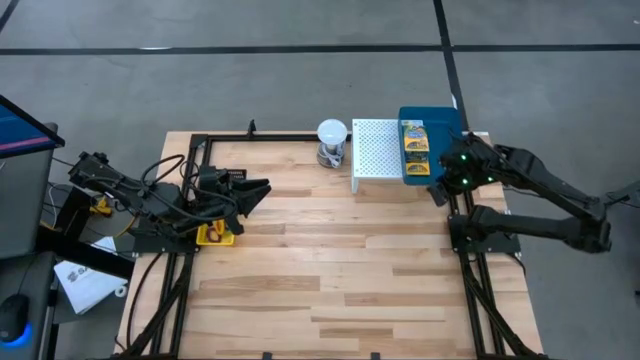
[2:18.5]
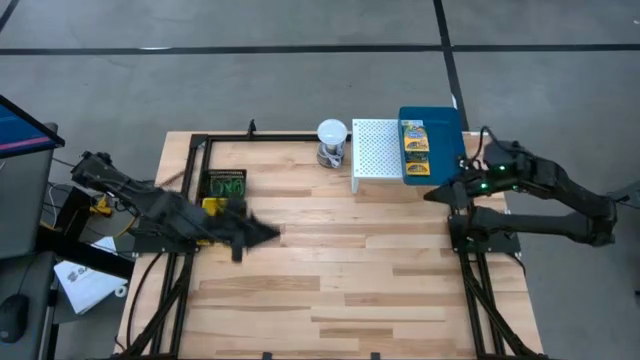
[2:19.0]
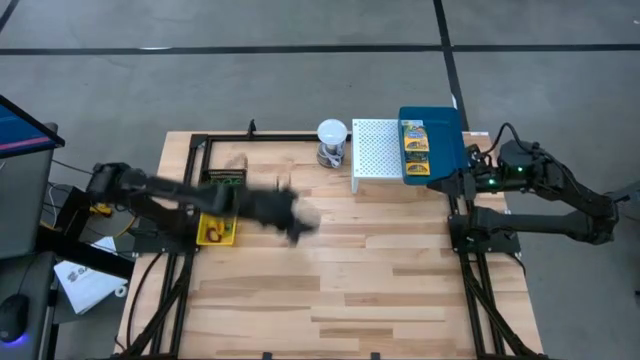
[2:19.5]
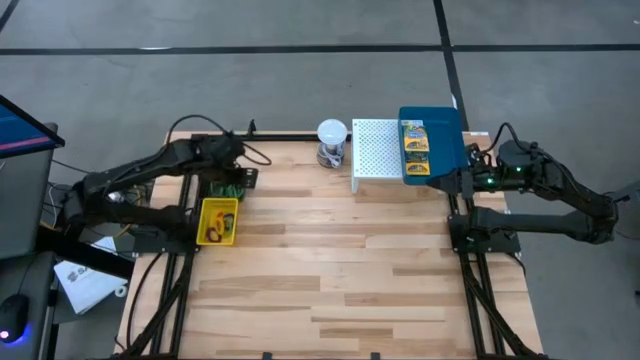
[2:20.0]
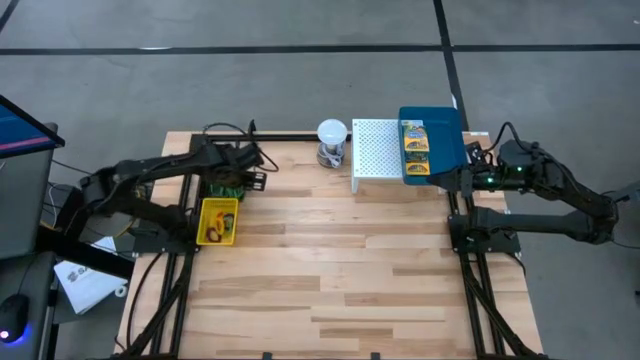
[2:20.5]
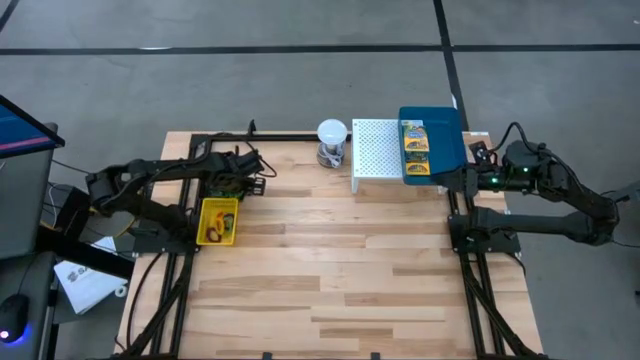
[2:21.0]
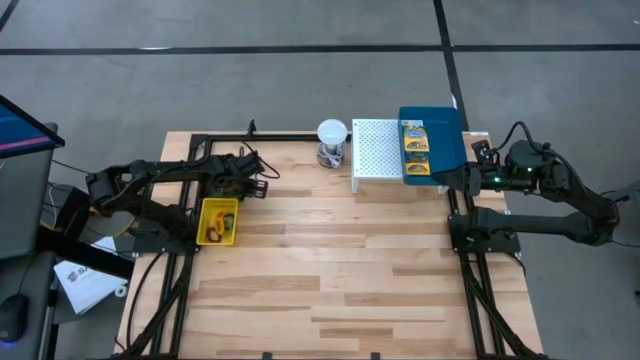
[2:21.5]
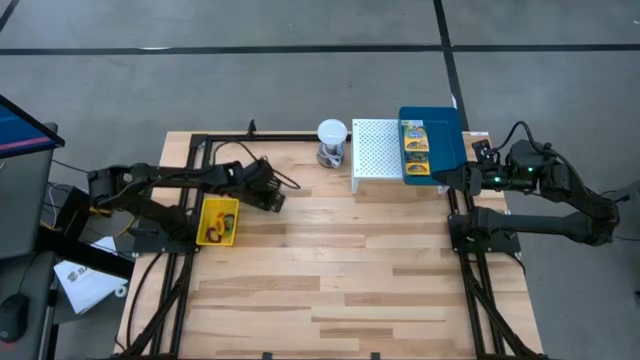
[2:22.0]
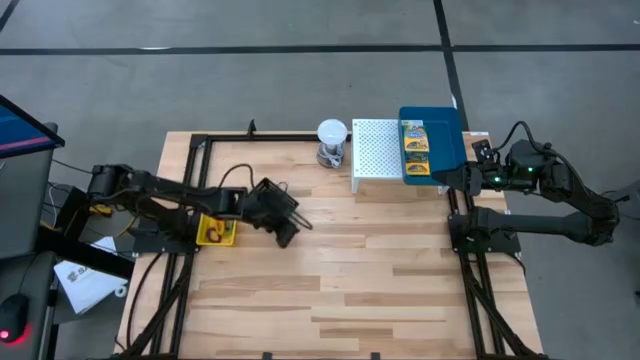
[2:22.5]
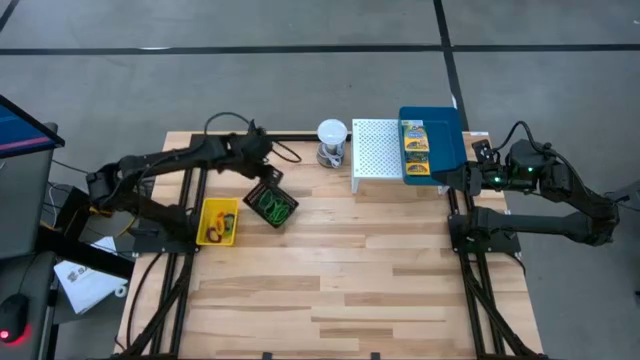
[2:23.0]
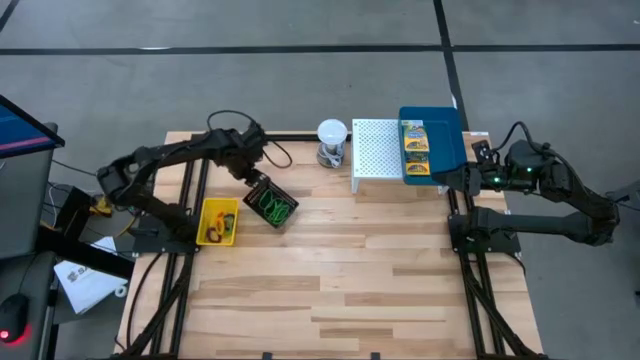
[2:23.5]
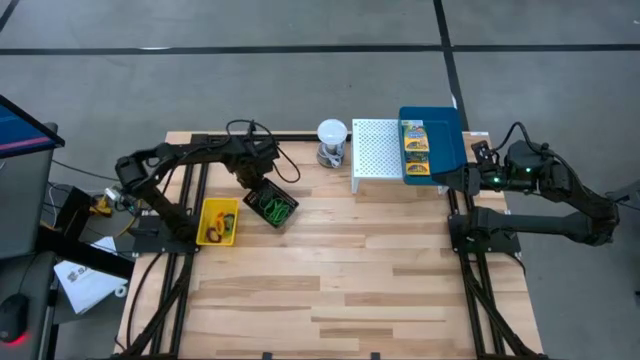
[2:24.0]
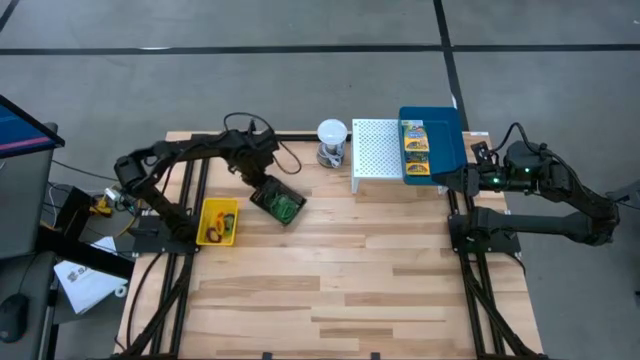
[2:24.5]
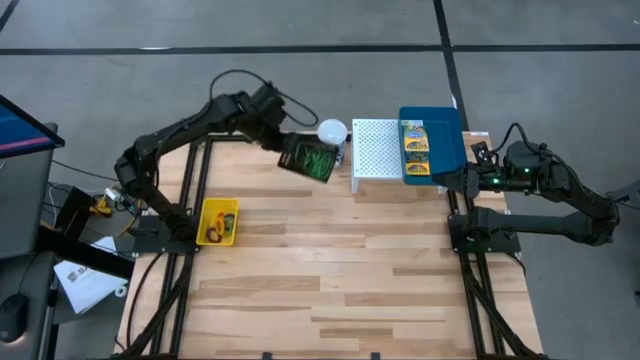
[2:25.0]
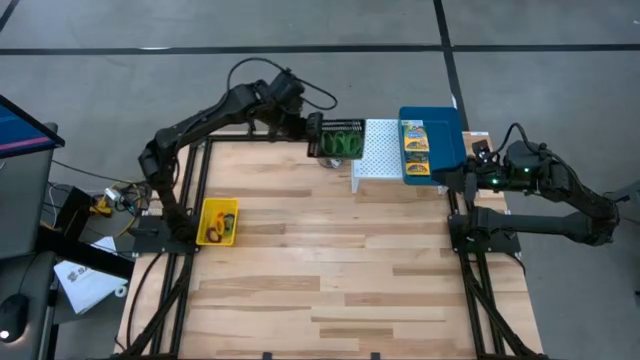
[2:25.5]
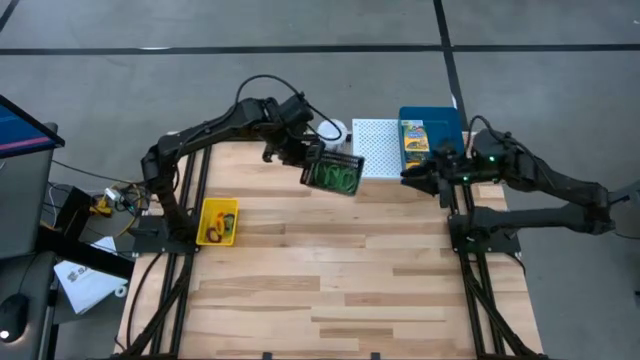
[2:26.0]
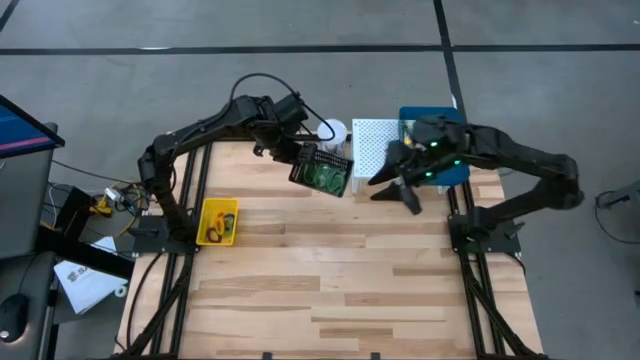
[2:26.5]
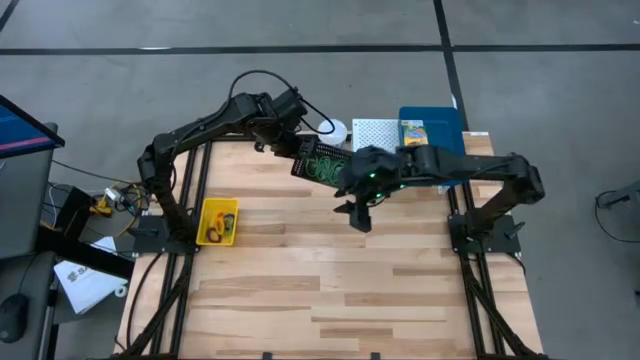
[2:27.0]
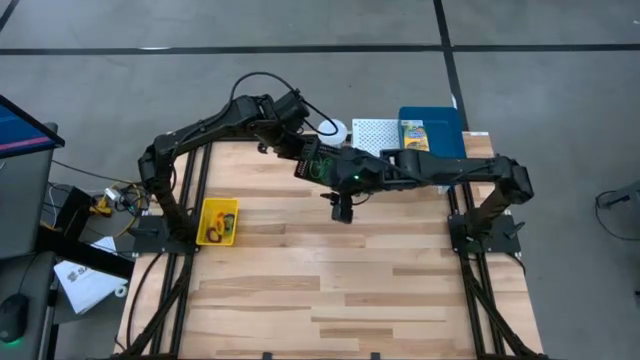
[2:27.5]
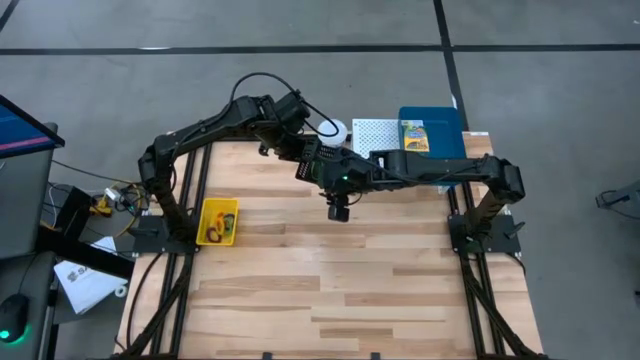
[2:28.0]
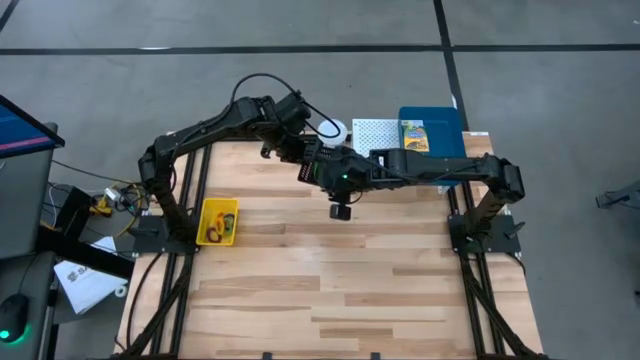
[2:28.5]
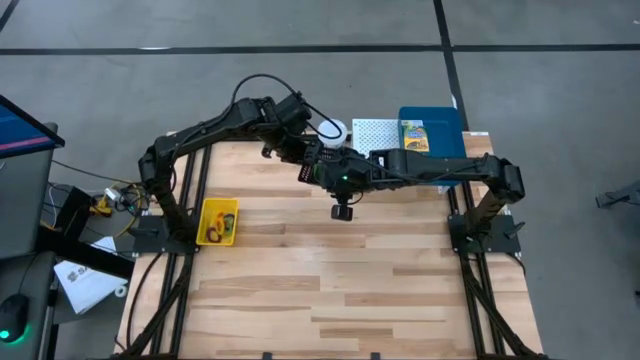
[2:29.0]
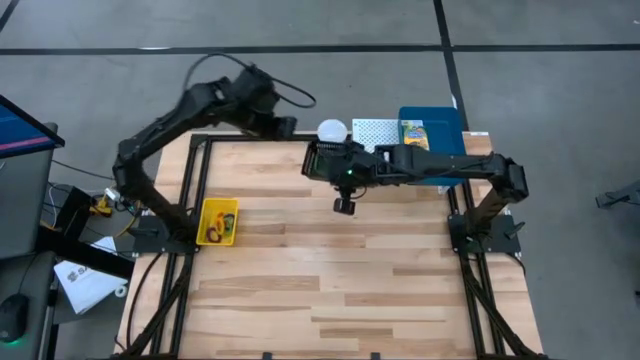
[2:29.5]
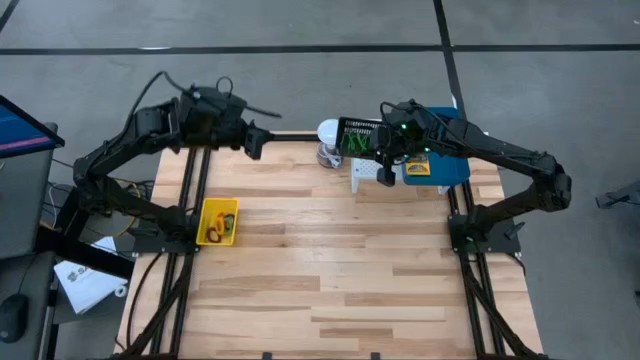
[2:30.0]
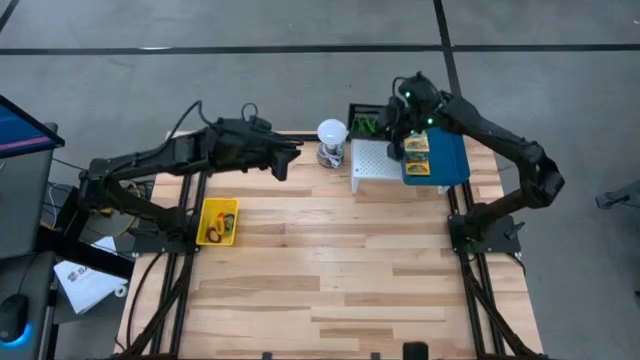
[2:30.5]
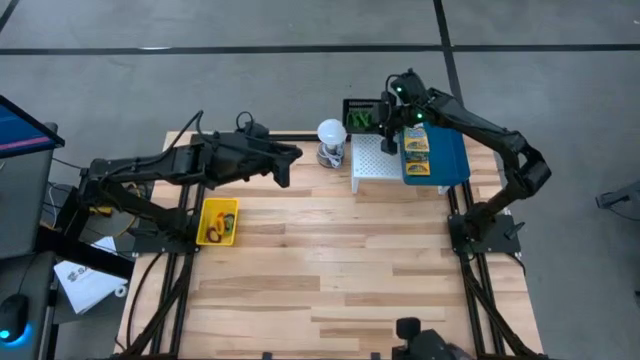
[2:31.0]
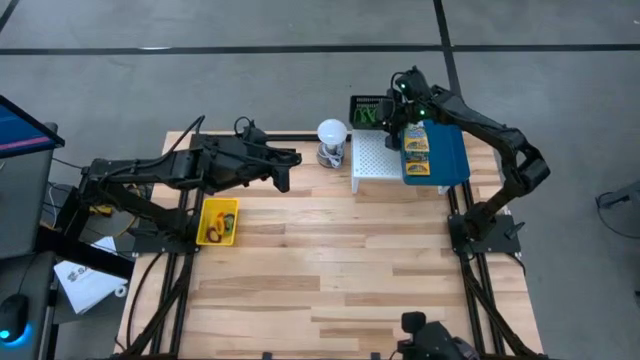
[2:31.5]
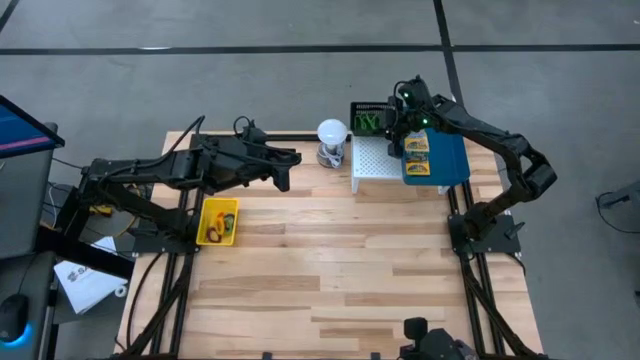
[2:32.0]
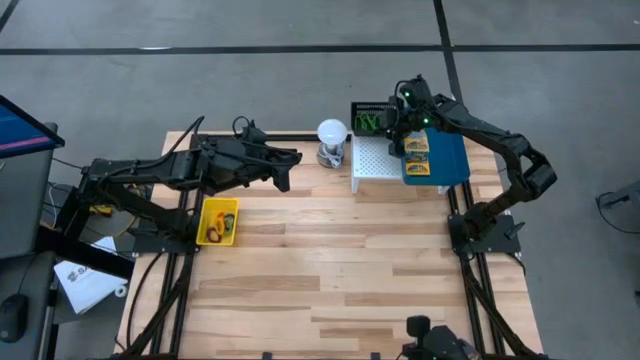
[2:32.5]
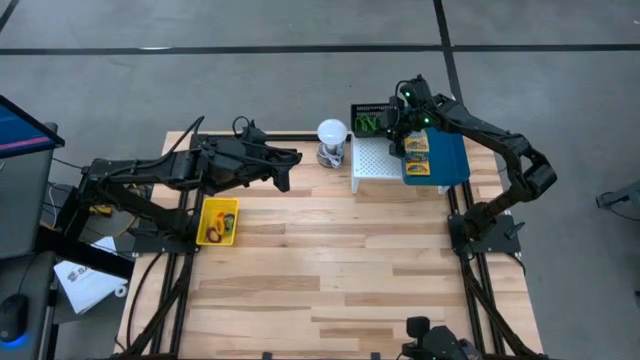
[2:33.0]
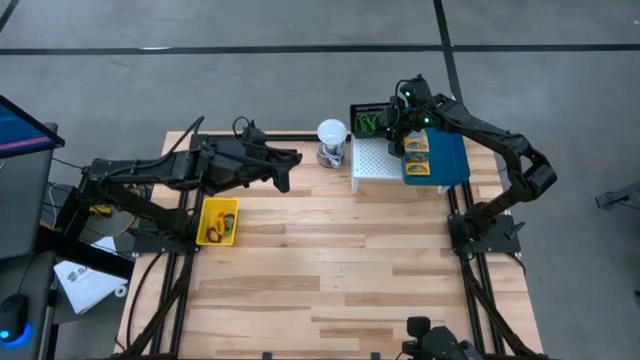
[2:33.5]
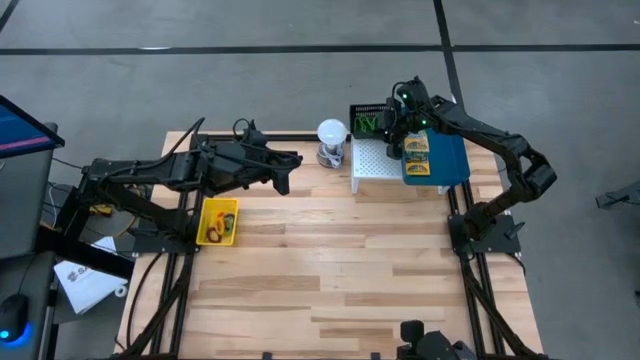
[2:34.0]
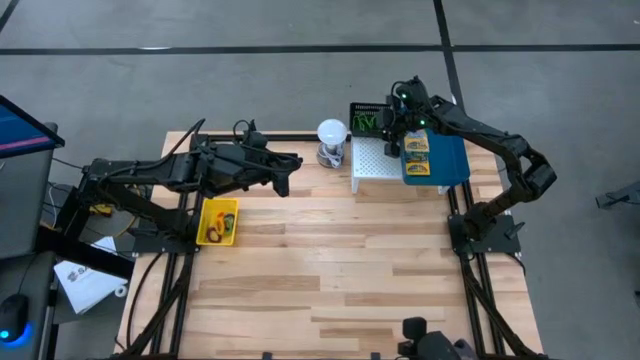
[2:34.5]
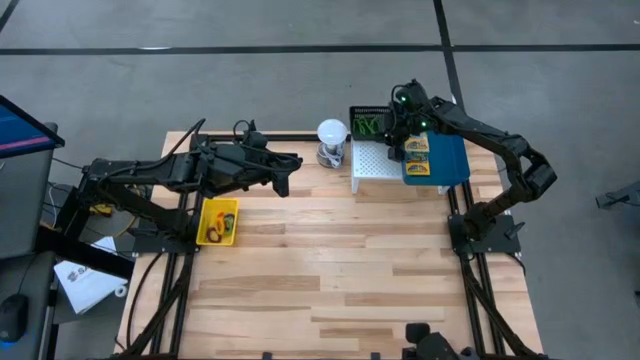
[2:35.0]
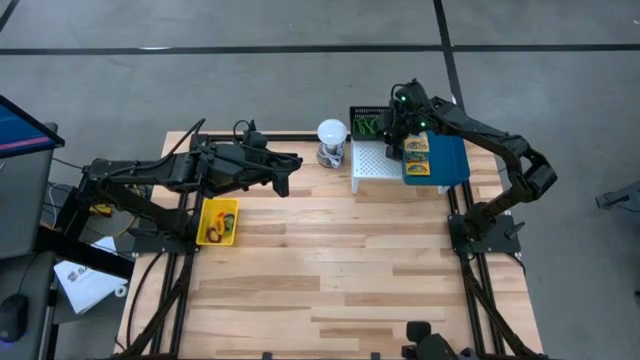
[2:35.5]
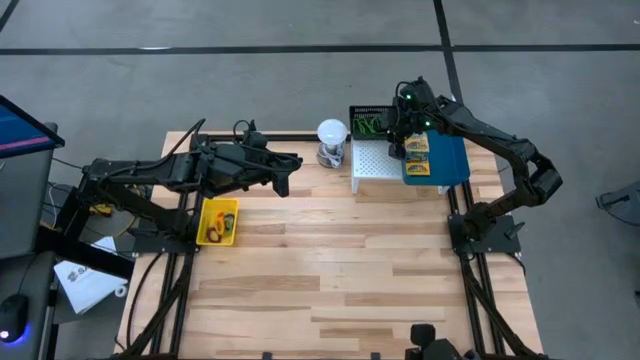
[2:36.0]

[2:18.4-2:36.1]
Task: Pick & Place Office Desk Supplies
Put the black bin on the shelf

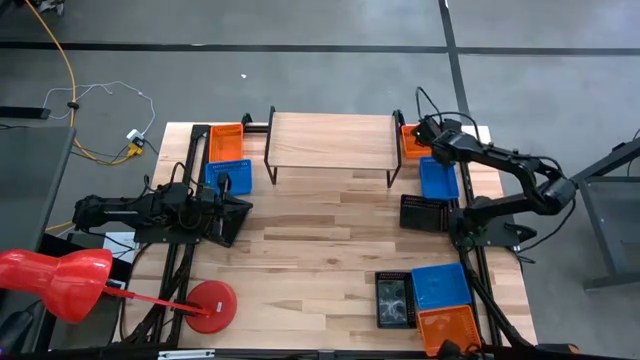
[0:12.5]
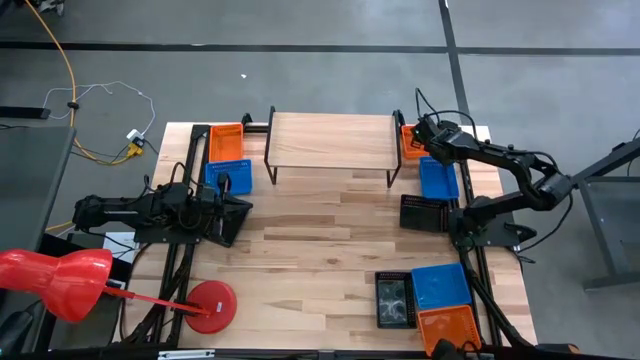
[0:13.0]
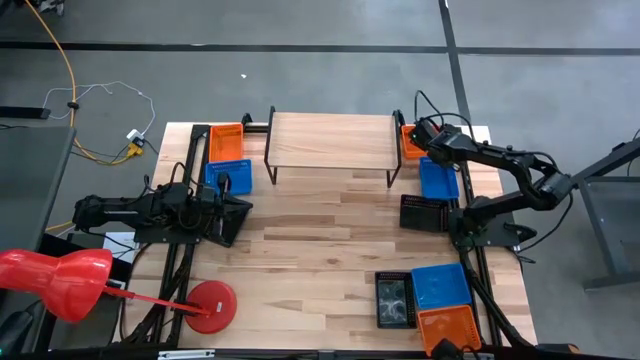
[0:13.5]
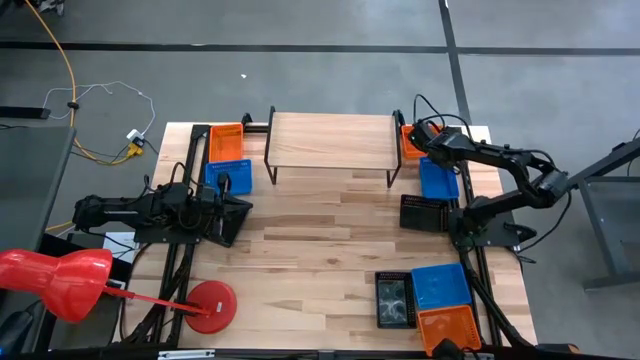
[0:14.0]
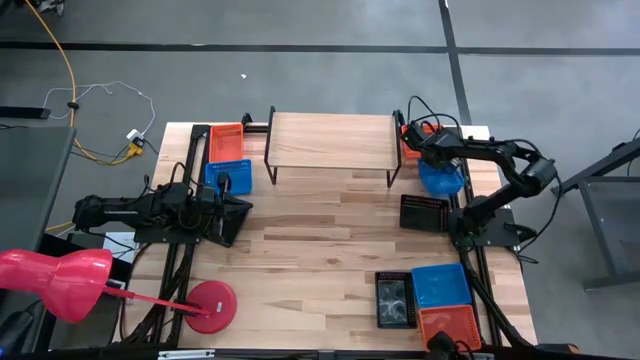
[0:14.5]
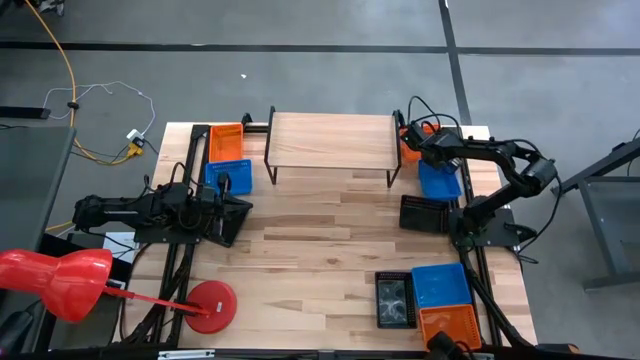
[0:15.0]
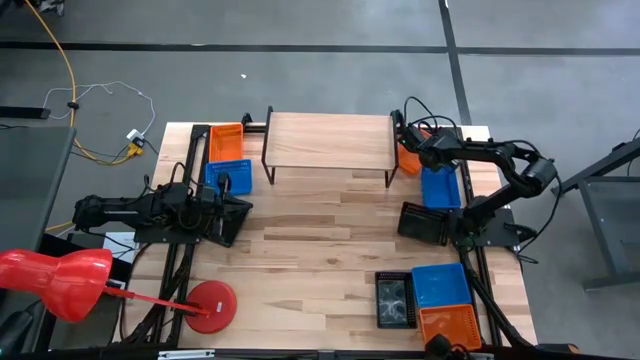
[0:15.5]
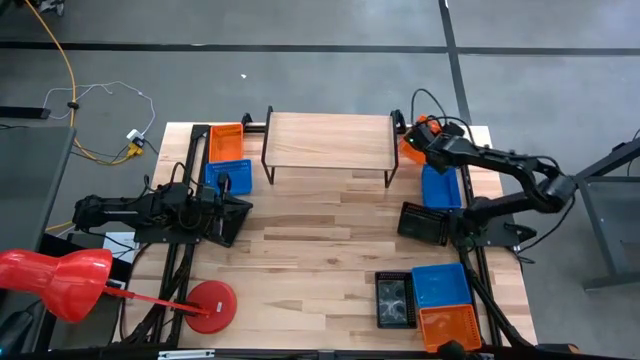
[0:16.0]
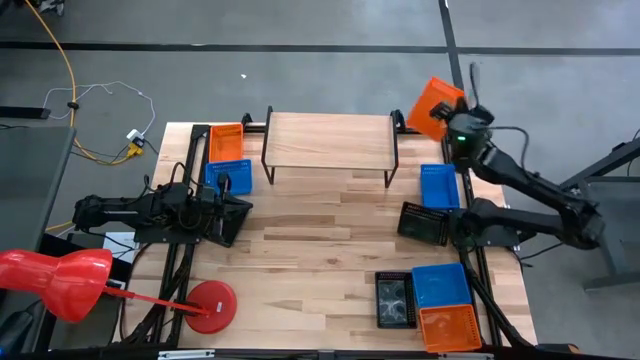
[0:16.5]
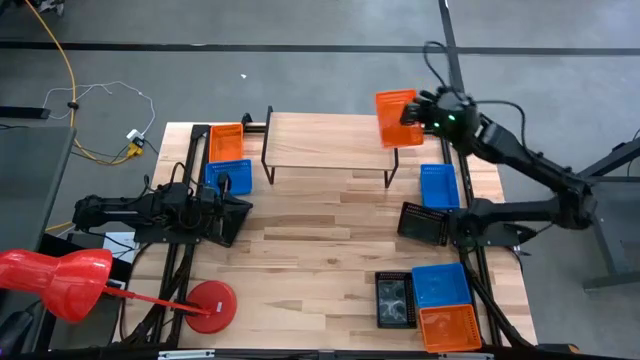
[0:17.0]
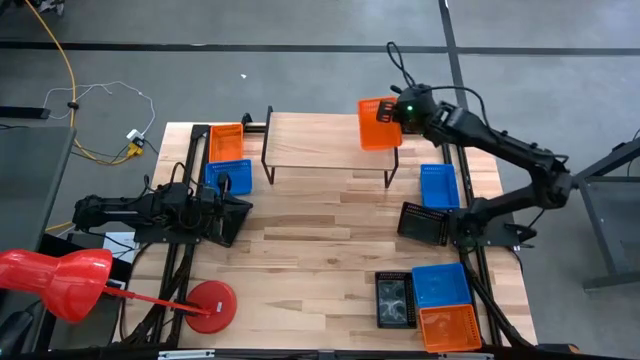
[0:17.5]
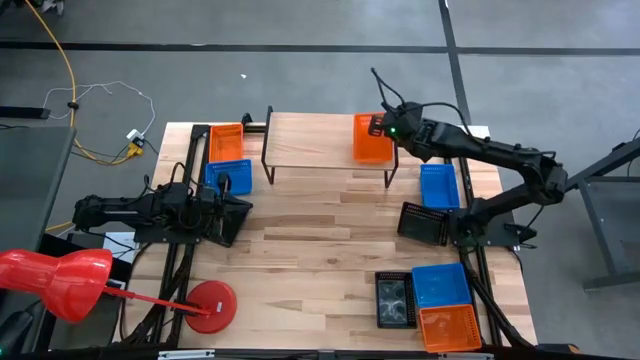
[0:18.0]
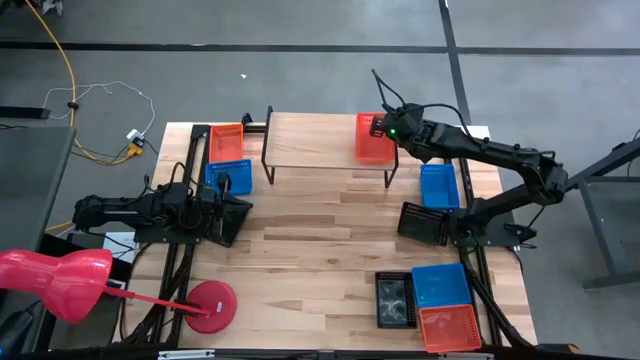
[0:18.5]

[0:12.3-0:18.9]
Task: Stack baskets on shelf by color
Put the top right orange basket on the shelf
